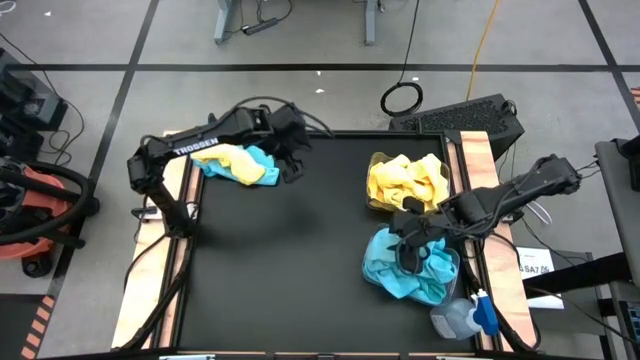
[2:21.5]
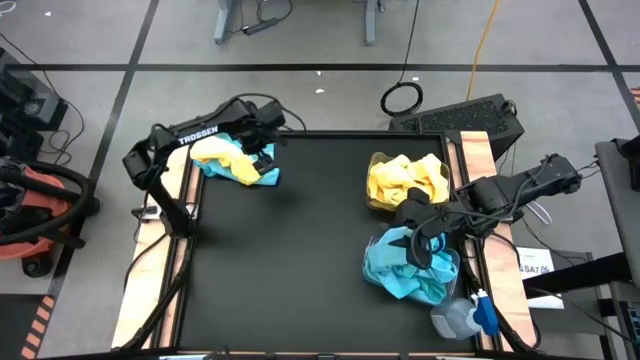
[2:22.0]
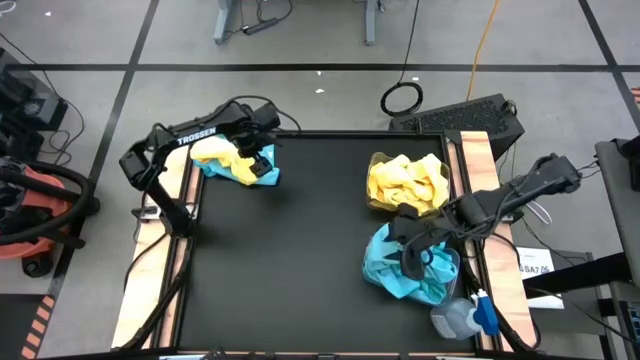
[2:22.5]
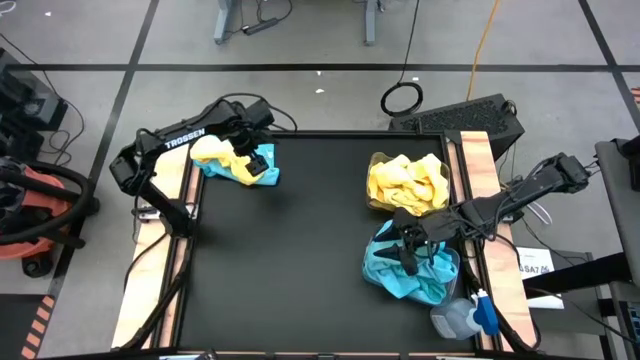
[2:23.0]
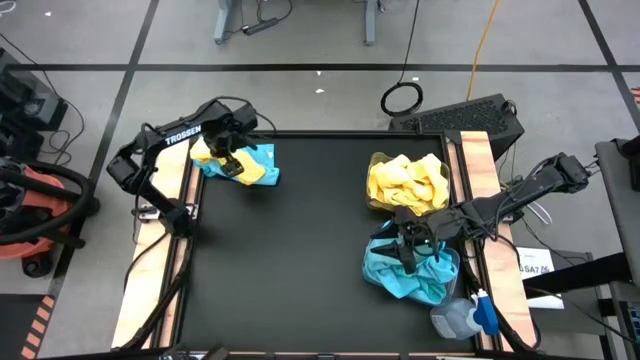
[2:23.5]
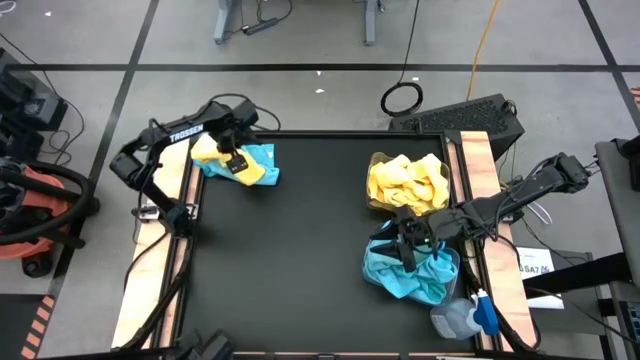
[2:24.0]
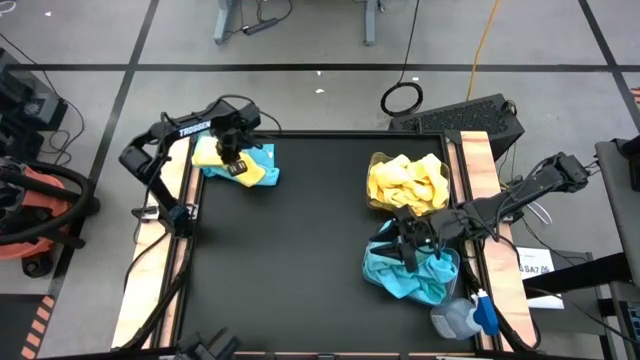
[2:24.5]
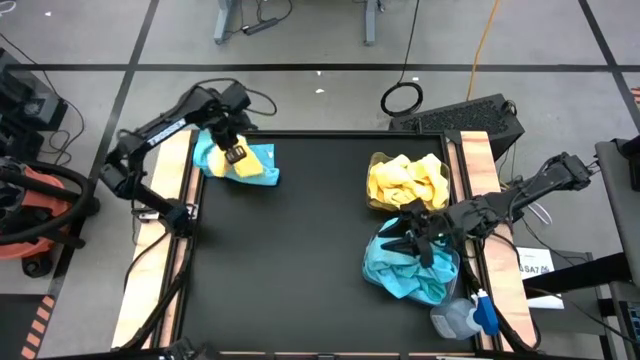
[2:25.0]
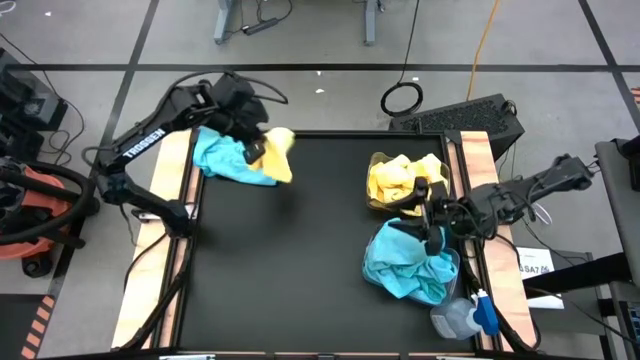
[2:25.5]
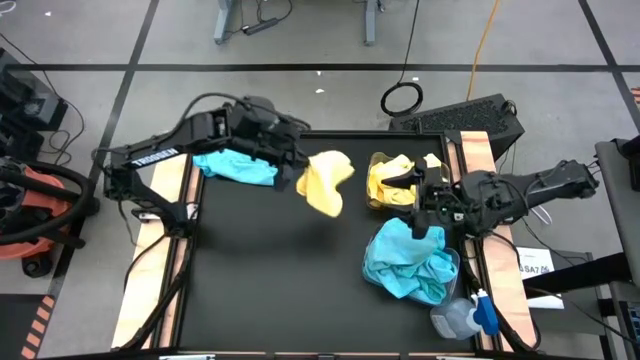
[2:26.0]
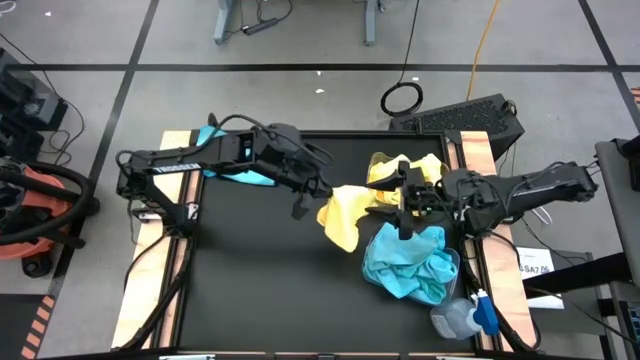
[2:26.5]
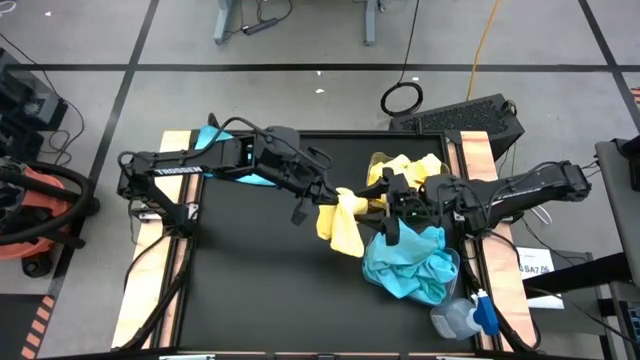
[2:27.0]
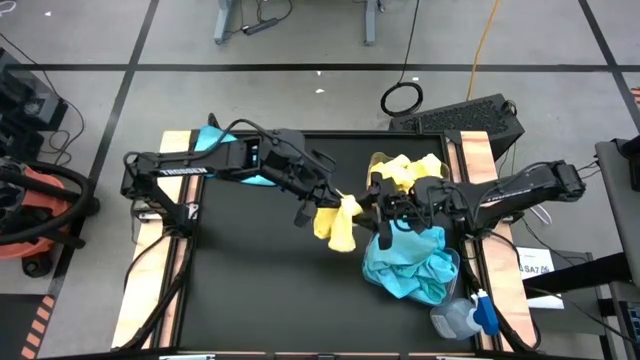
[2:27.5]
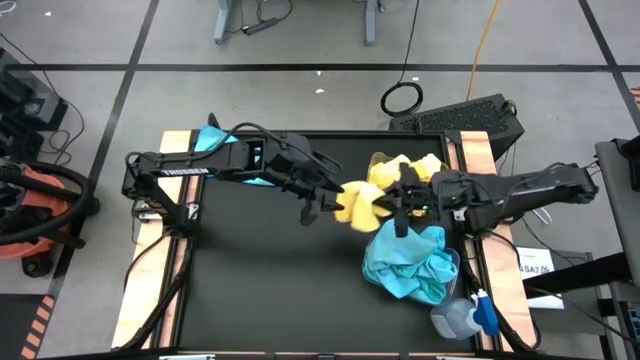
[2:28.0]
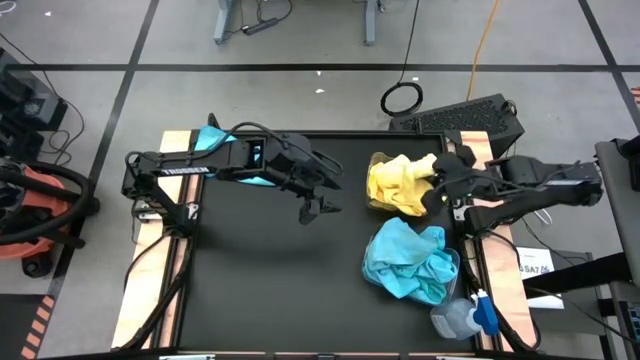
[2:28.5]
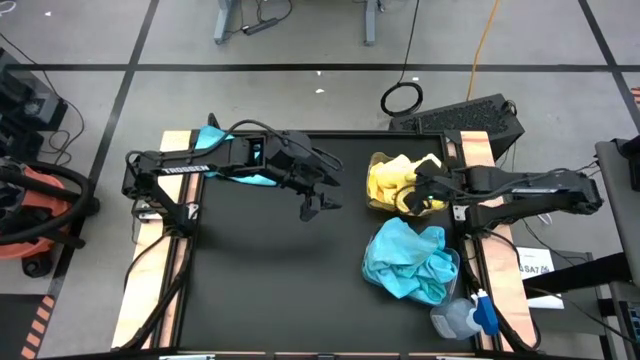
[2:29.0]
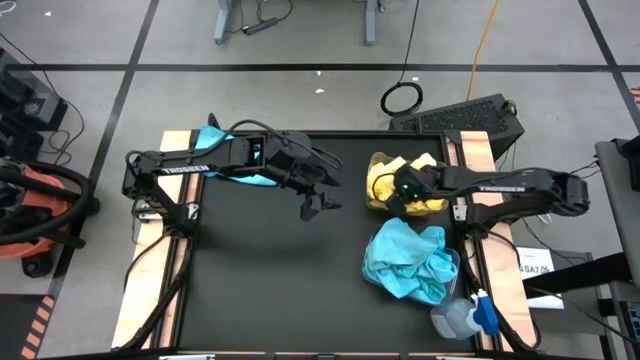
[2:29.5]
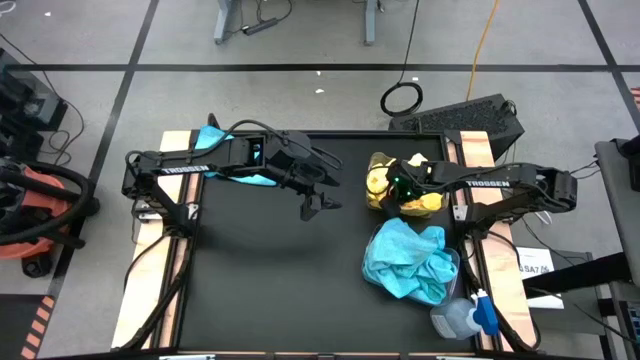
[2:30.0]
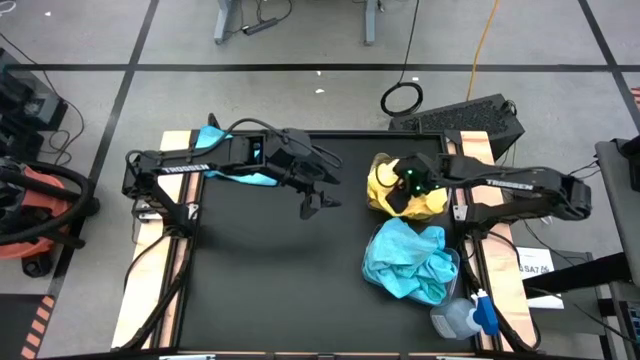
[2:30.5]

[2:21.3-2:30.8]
Task: Sort microfiber towel by color & place in baskets
Put the yellow microfiber cloth into the top transparent bin

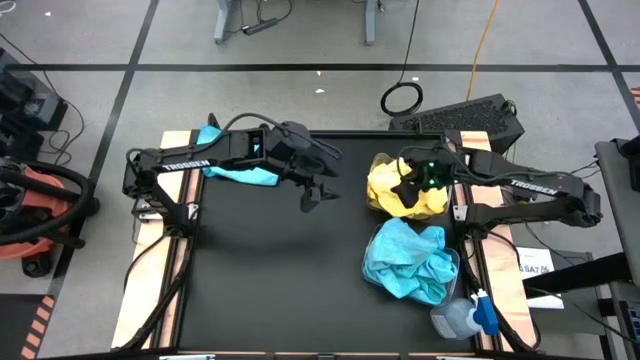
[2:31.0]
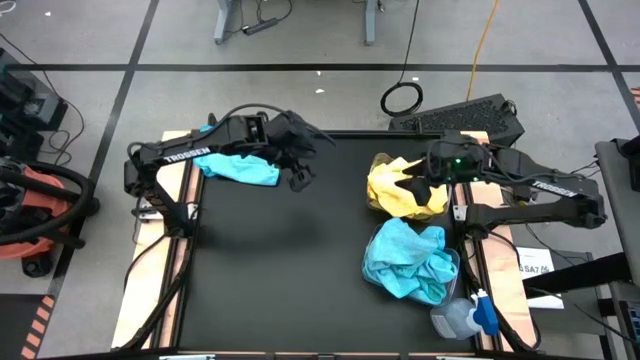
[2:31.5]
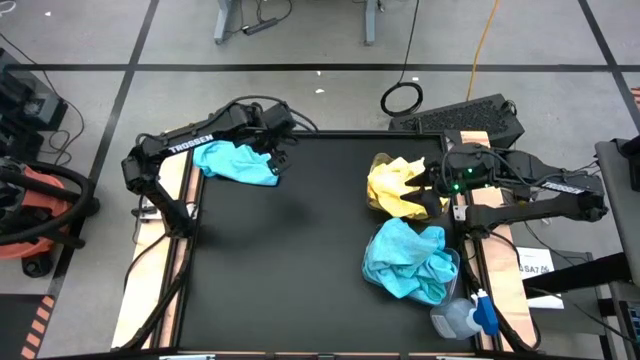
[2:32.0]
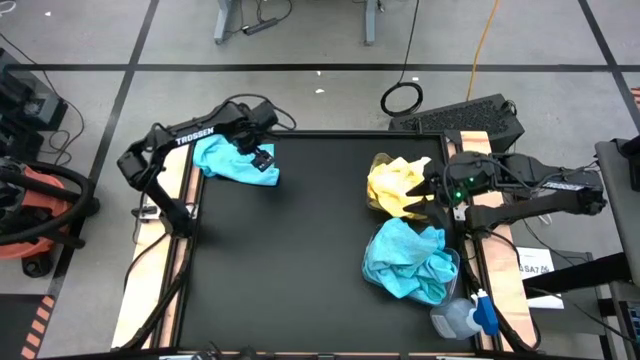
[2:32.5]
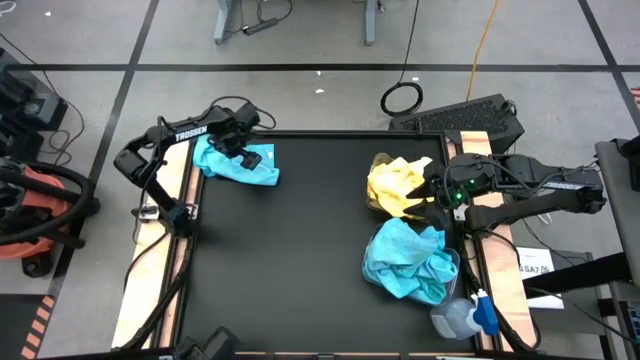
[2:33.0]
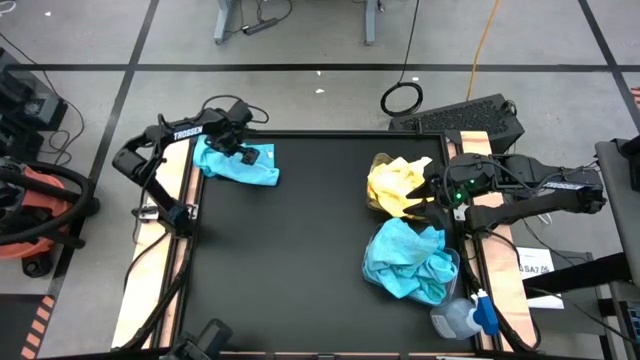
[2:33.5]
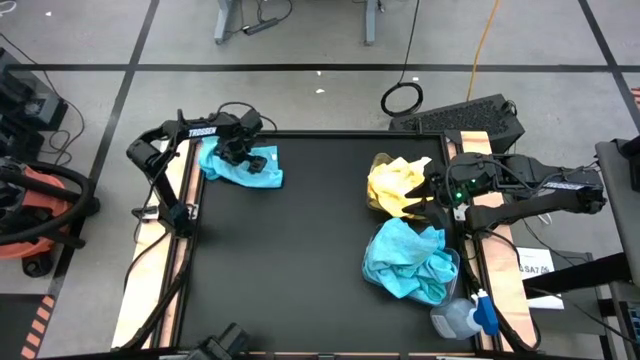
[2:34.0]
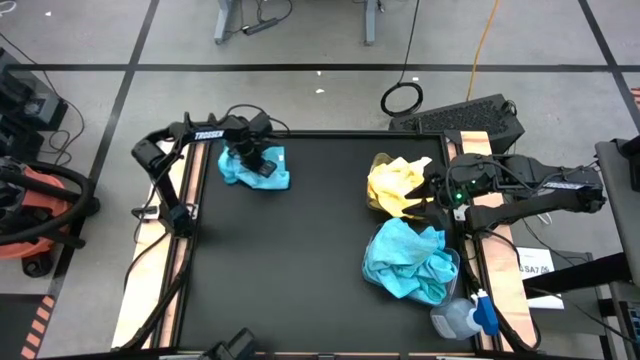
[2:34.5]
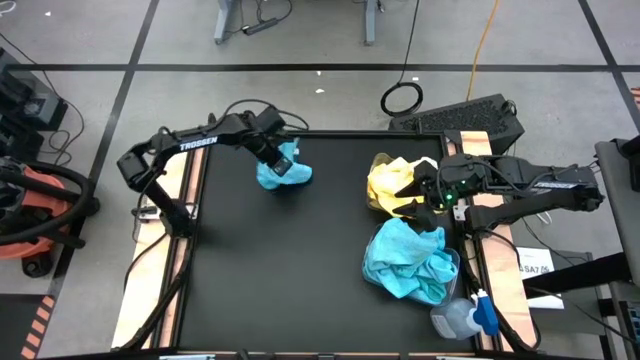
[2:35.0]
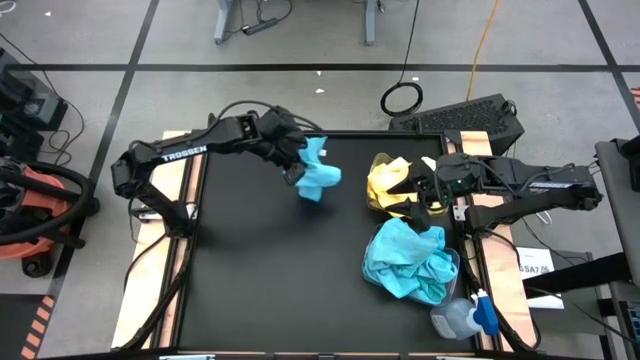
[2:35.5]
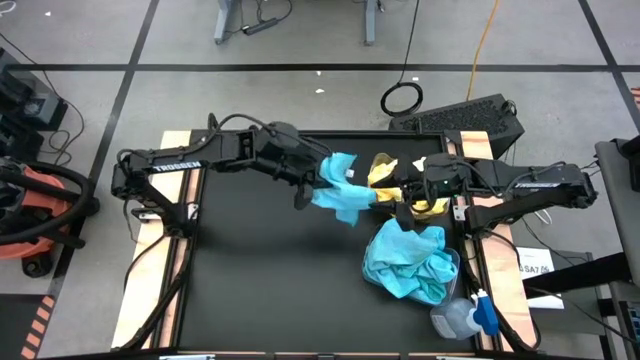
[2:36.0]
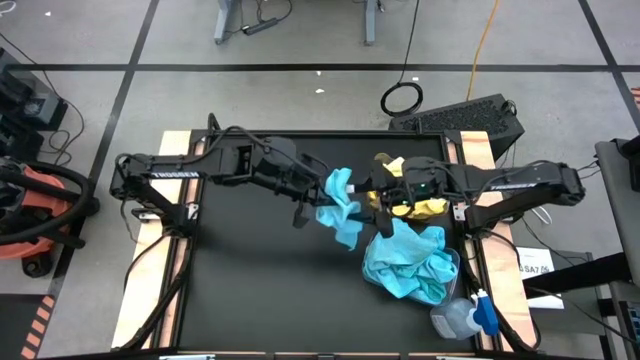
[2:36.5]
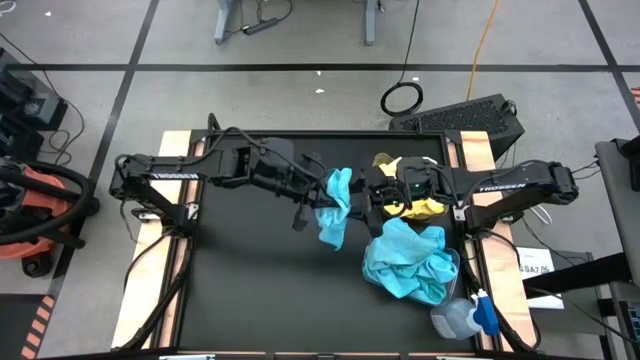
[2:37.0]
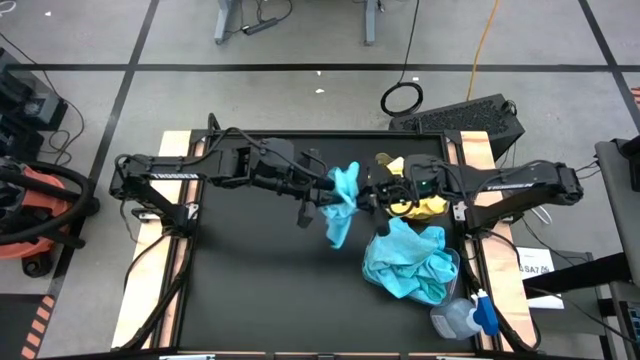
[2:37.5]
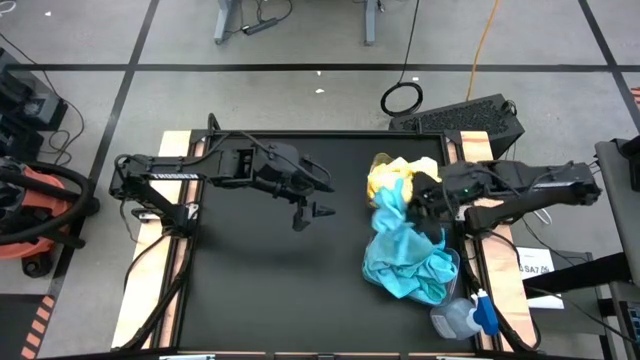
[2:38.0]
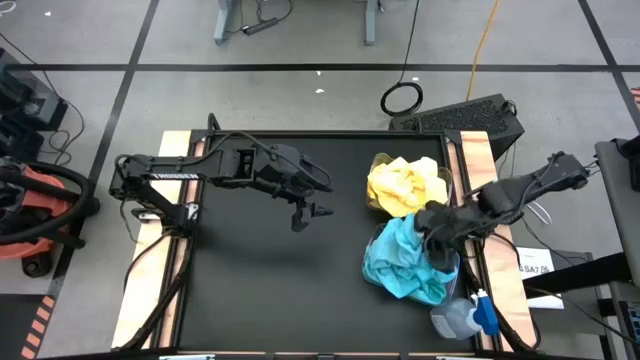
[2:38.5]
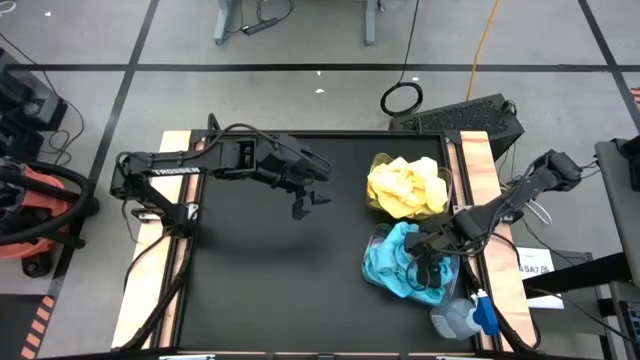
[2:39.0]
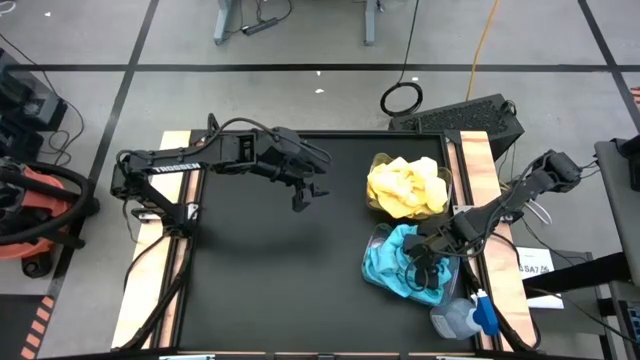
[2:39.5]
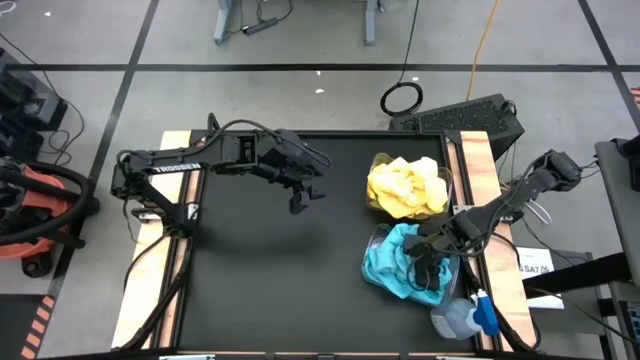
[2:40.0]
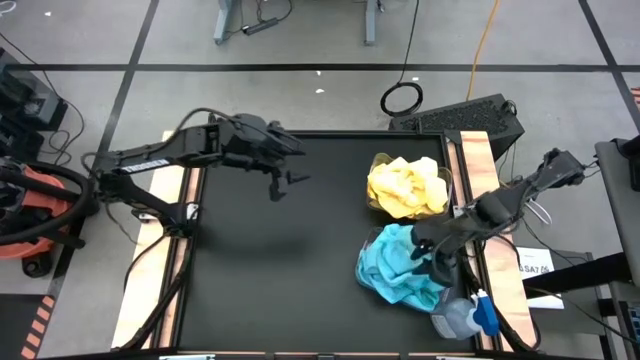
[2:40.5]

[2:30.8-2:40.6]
Put the blue microfiber cloth into the bottom transparent bin

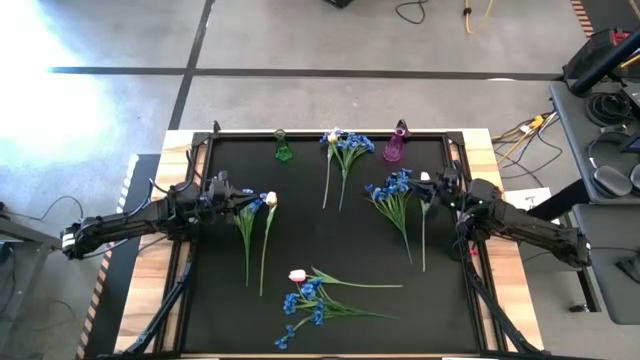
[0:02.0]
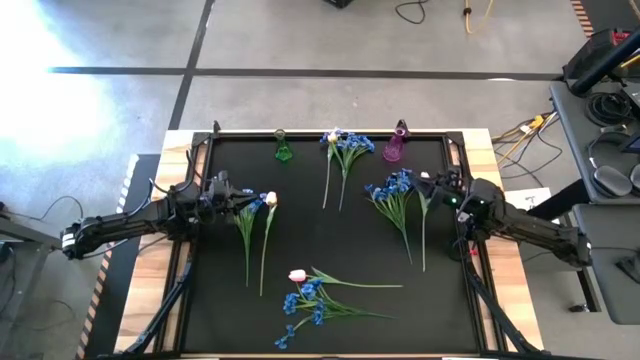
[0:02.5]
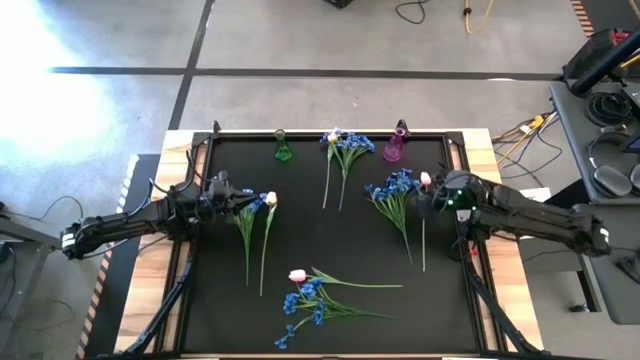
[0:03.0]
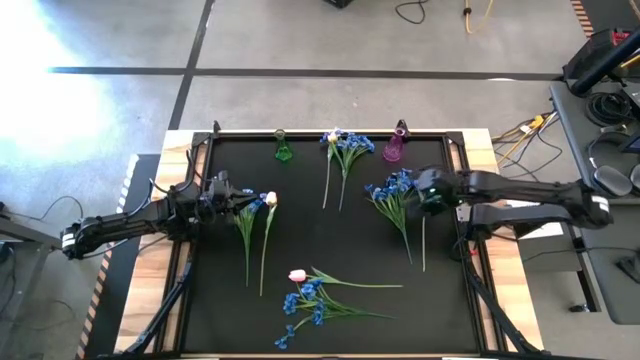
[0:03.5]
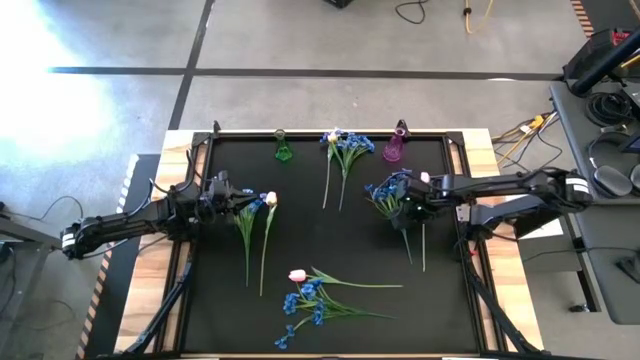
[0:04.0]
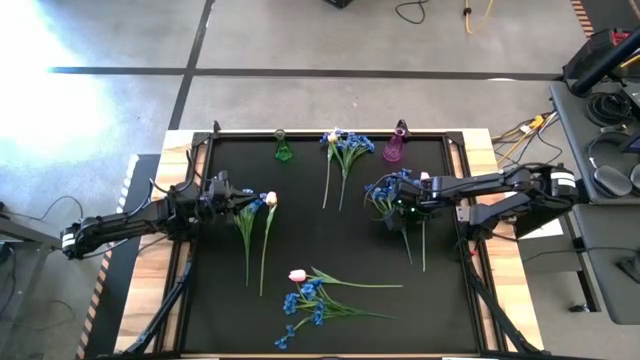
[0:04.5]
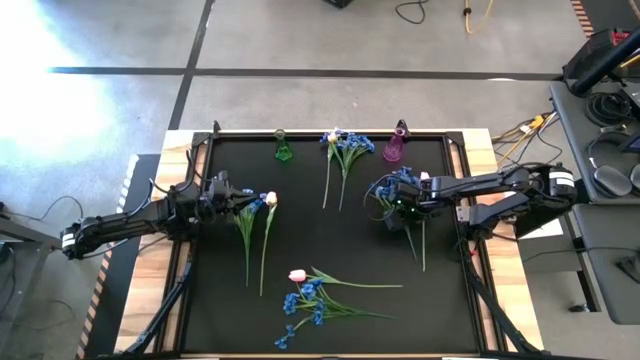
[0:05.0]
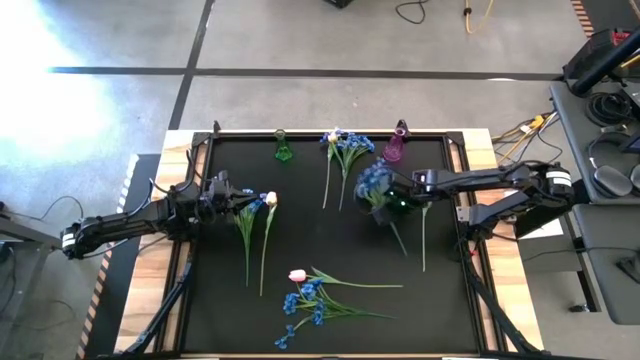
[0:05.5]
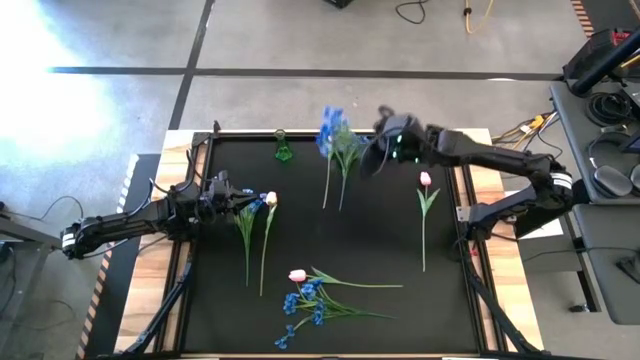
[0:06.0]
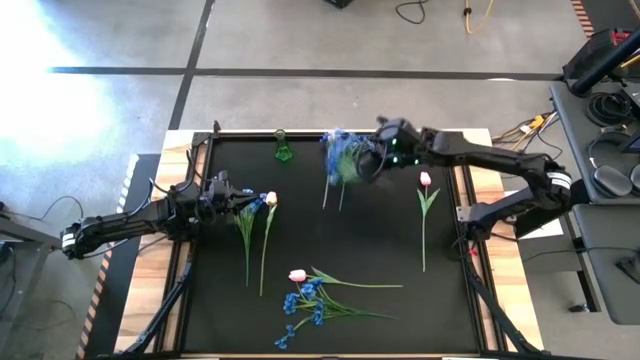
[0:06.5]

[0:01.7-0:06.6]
Task: Sort flowers into vase by color
Put the blue flowers into the violet vase
